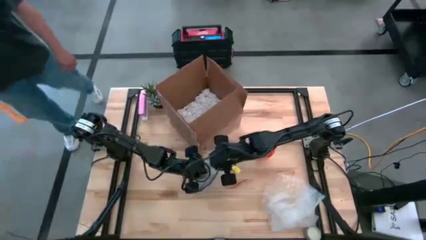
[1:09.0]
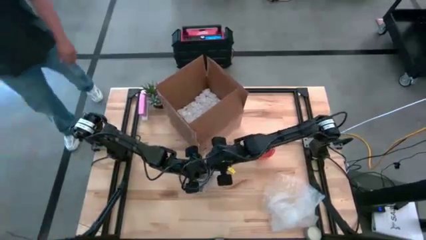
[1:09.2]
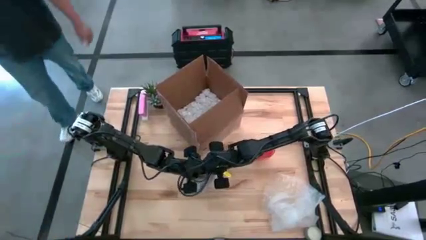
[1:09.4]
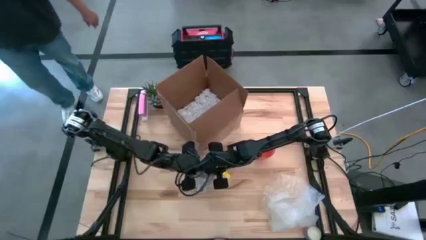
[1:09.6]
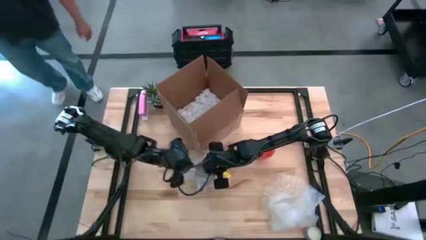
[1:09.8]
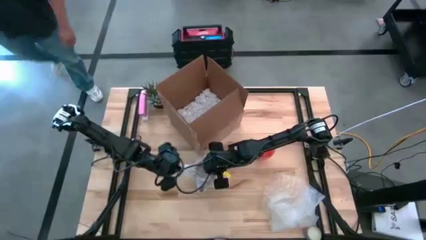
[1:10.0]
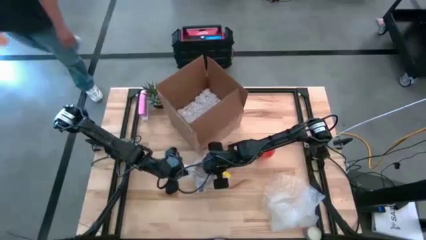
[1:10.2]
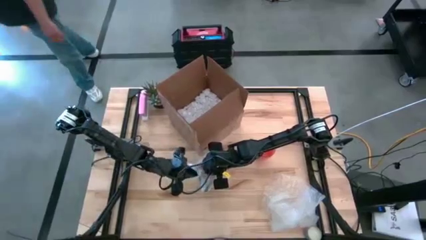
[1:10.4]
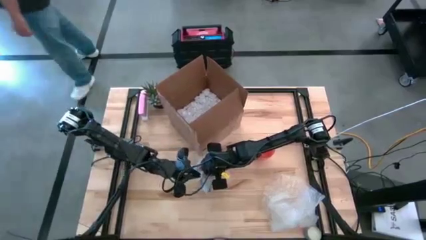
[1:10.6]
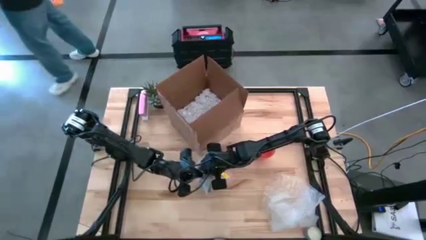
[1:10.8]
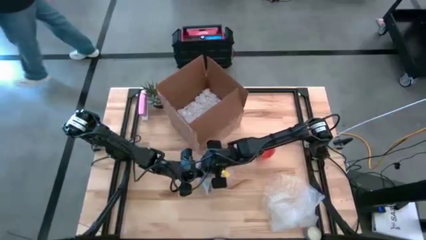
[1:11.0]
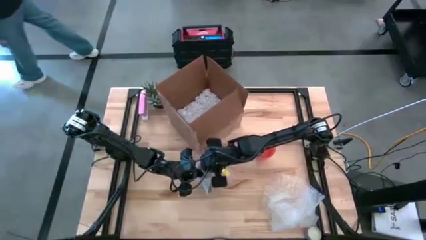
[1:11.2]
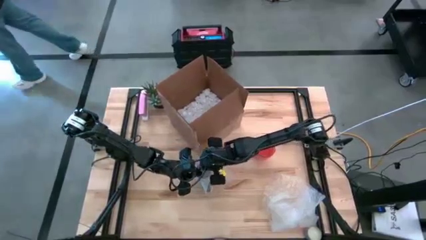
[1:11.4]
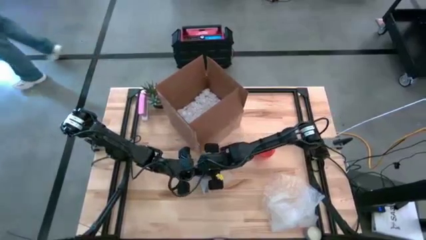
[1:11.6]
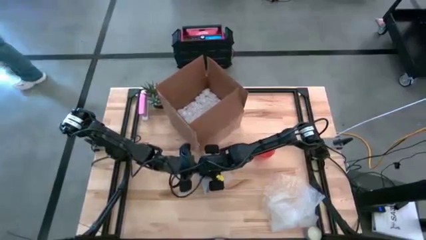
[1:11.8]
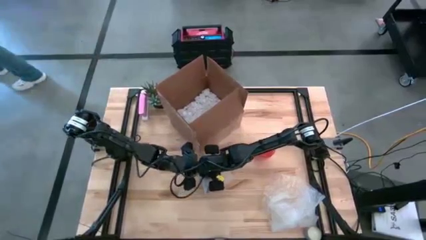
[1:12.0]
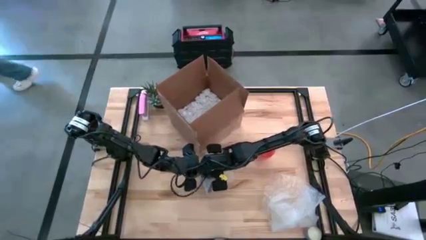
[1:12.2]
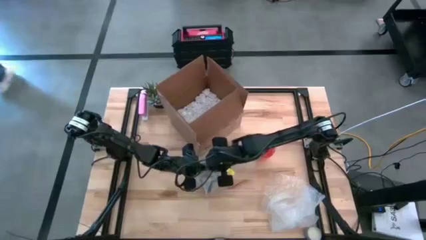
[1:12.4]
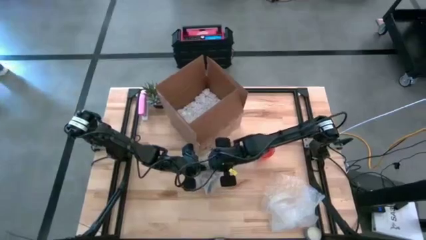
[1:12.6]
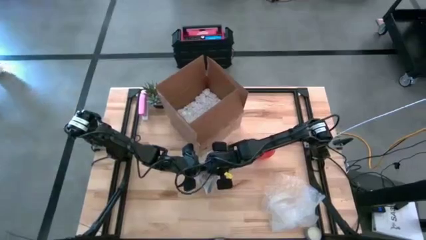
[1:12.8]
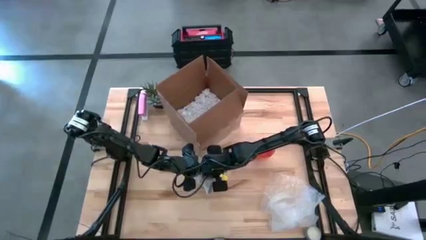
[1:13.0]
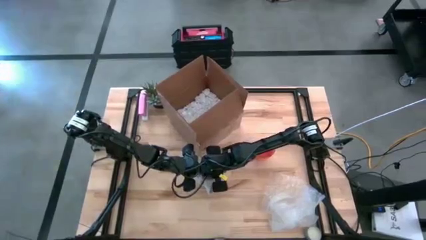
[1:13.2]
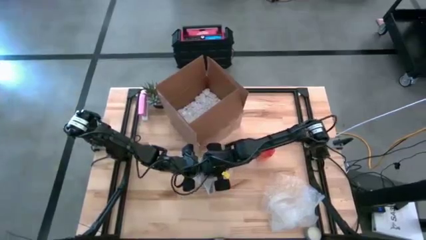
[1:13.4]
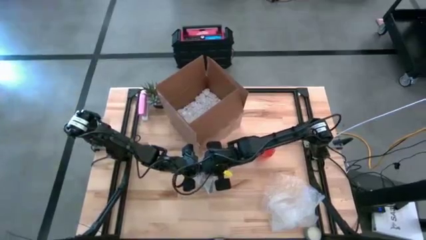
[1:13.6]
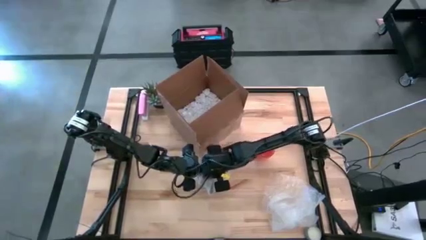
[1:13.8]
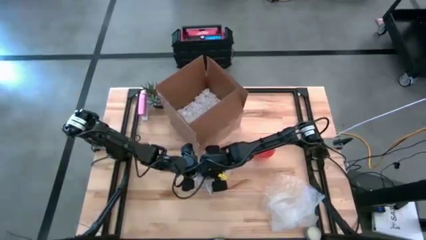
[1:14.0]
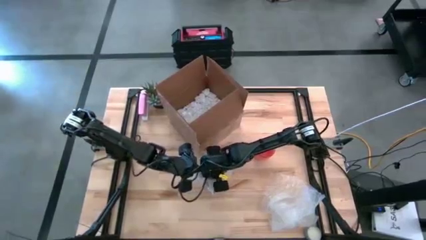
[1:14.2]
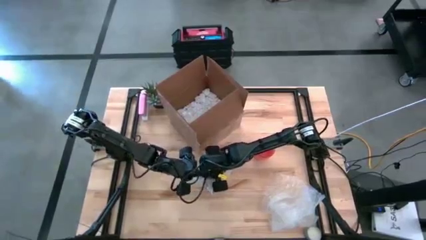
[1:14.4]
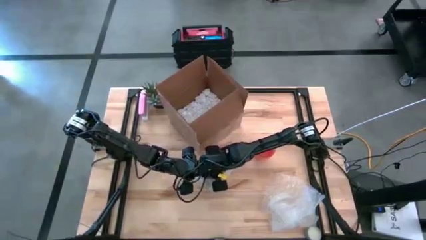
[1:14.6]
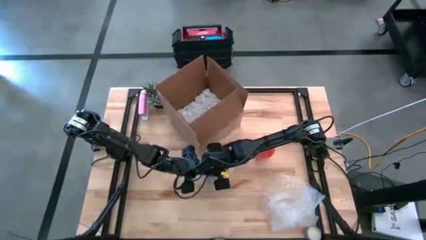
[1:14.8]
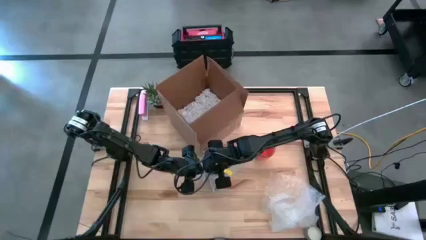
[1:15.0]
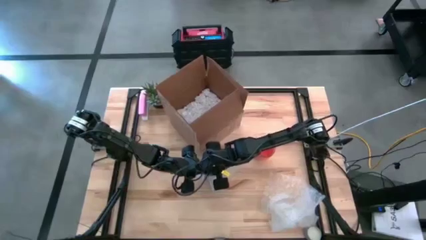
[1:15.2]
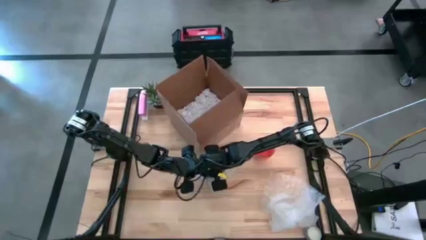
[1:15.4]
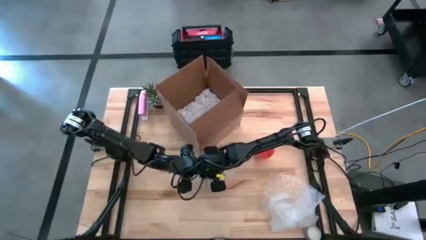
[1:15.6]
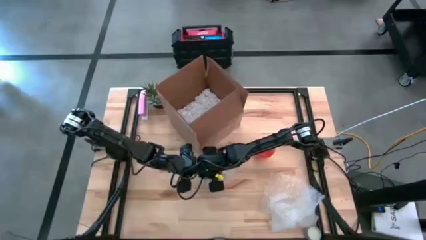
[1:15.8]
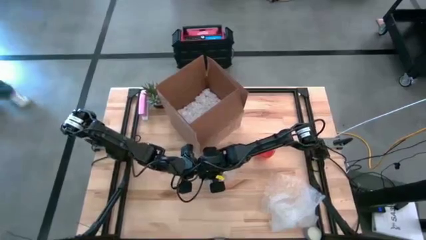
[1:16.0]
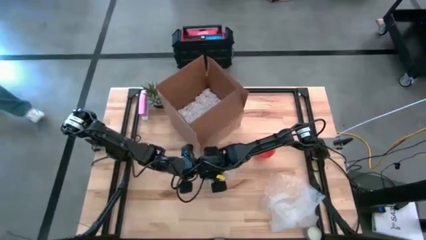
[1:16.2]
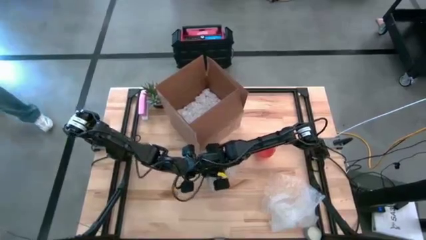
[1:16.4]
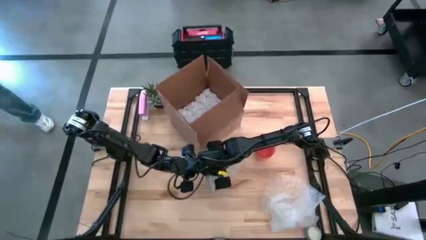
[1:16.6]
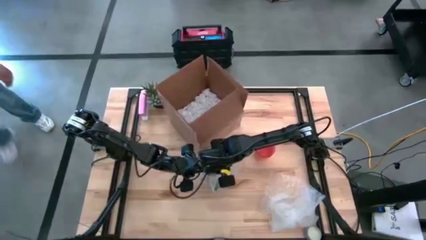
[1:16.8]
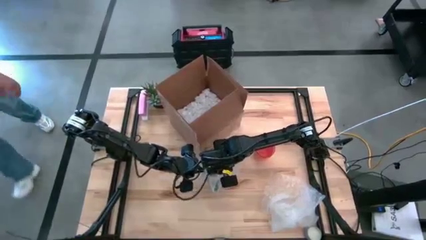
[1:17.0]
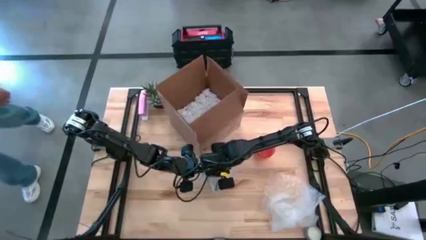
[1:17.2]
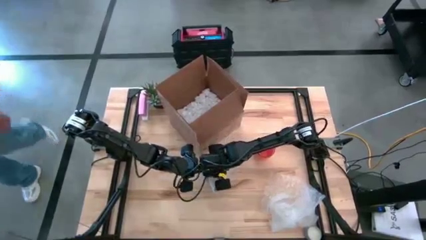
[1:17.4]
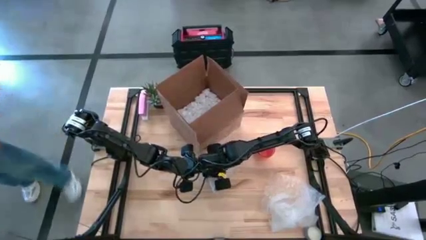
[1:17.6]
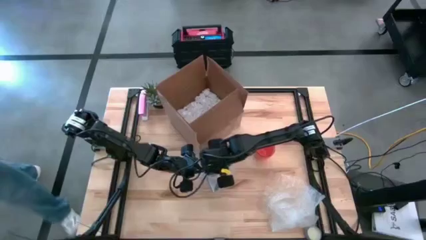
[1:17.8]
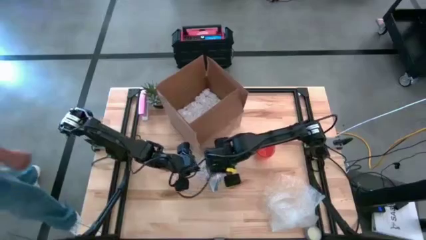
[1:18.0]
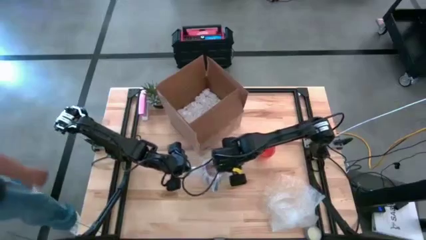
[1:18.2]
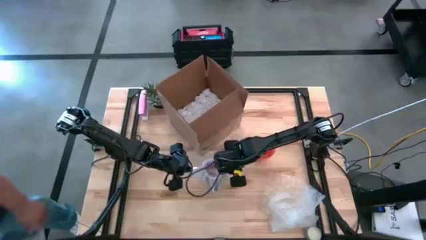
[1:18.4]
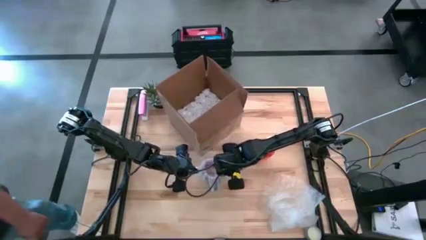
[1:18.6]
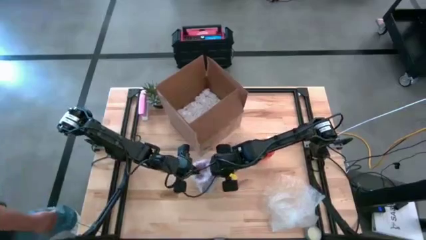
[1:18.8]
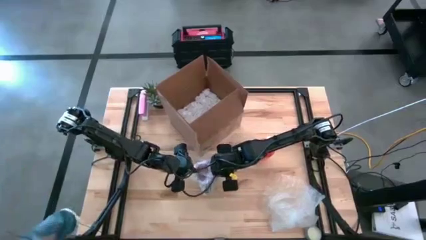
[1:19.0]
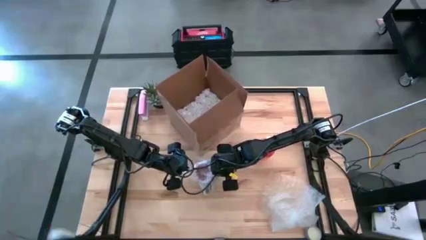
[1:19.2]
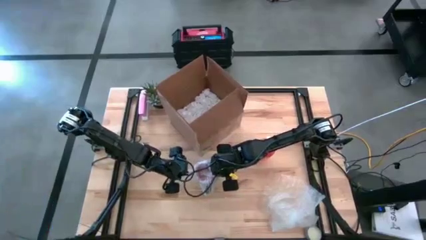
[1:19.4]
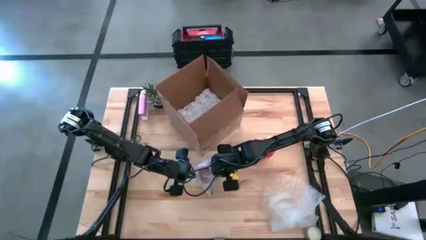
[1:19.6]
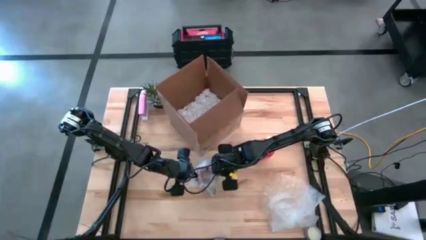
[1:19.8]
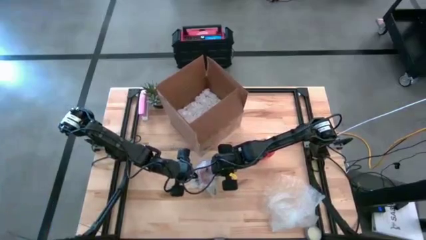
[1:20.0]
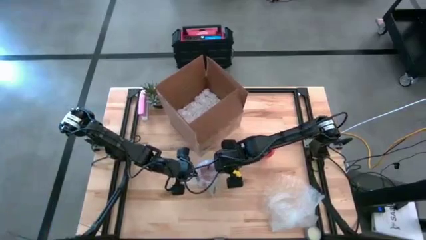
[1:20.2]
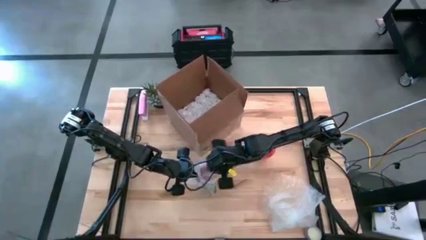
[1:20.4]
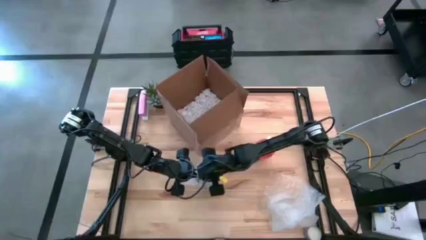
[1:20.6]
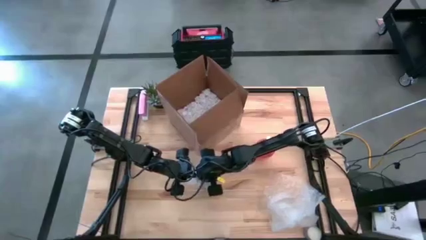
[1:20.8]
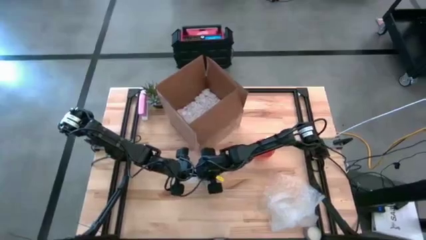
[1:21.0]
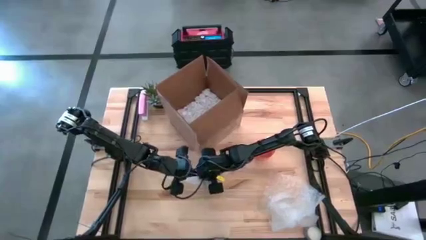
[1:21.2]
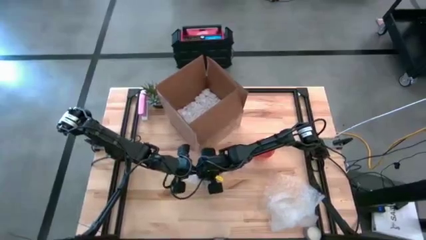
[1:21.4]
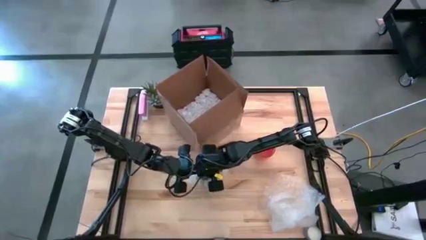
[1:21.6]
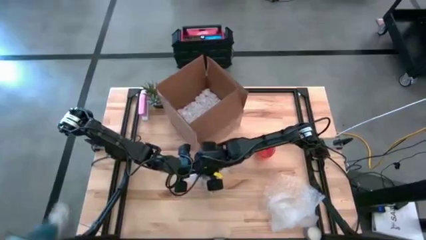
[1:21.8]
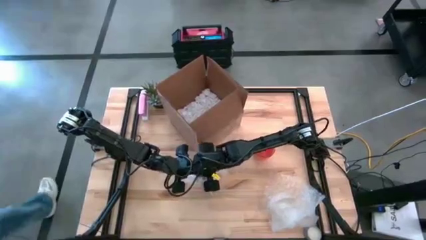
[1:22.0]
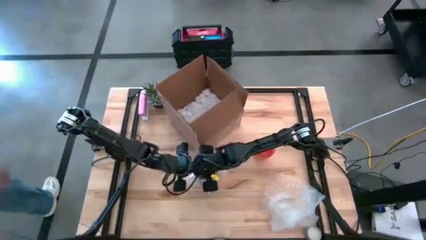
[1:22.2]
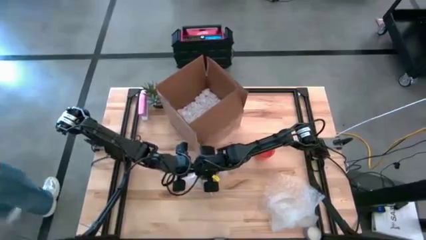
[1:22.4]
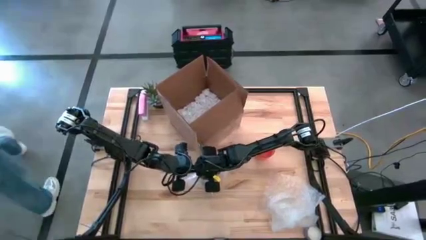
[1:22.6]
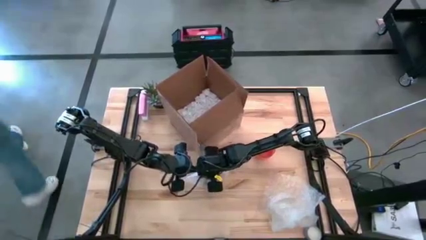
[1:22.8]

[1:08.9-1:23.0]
Task: wrap mug
Wrap the black mug with transparent bubble wrap

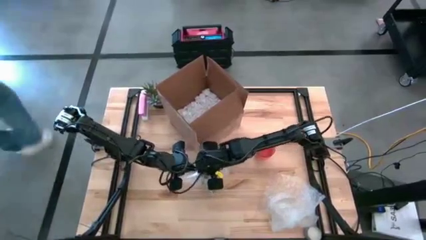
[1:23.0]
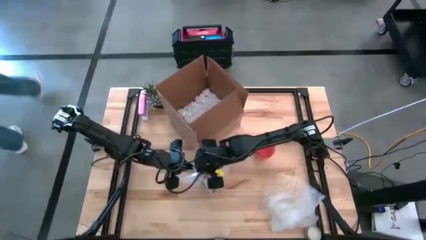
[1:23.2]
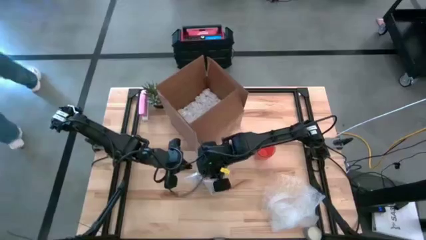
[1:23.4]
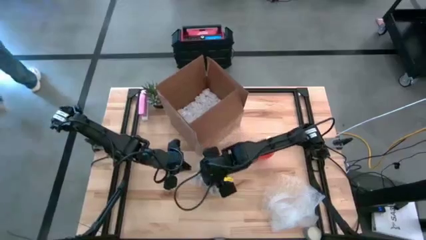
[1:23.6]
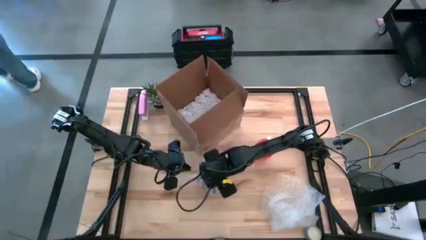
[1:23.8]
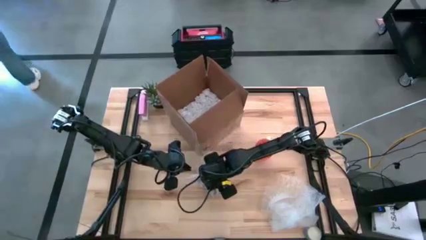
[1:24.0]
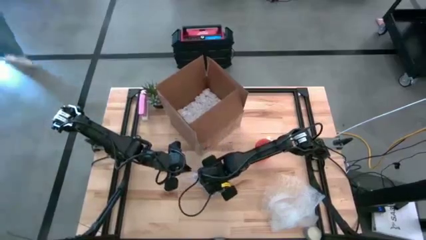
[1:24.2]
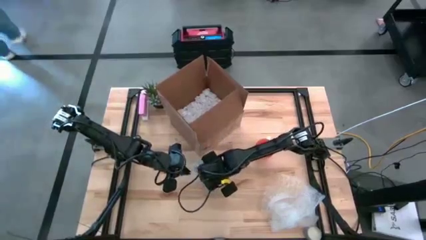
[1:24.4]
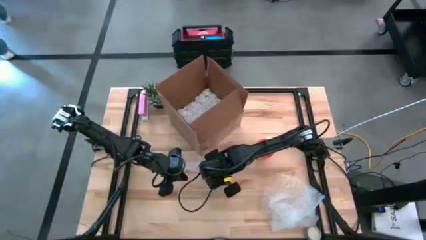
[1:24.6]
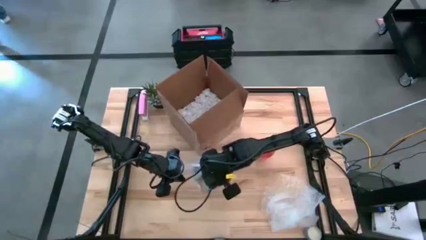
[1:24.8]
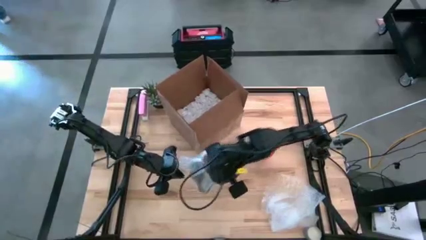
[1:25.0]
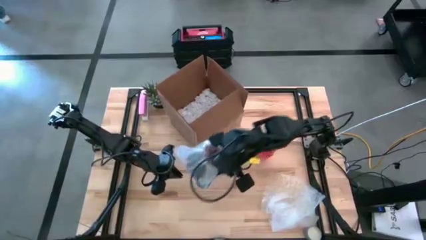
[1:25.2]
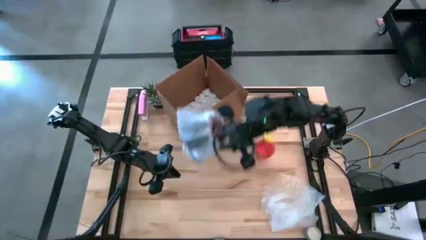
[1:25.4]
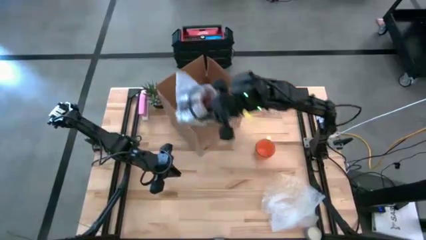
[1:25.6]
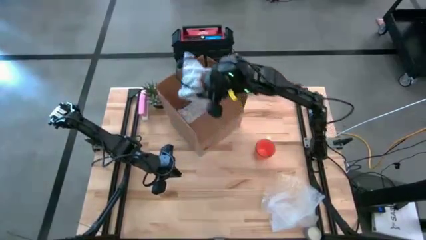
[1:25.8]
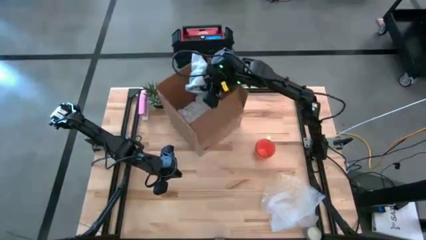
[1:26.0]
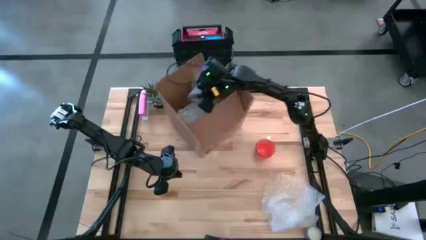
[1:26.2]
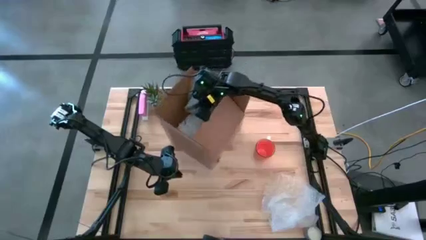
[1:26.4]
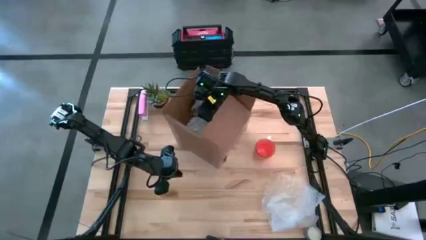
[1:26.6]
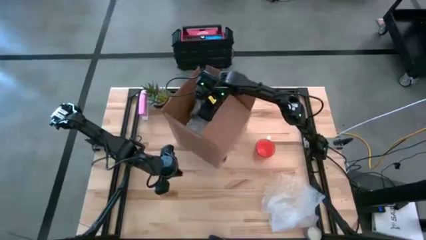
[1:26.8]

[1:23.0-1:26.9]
Put the wrapped black mug into the cardboard box
